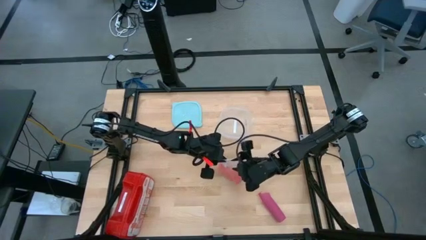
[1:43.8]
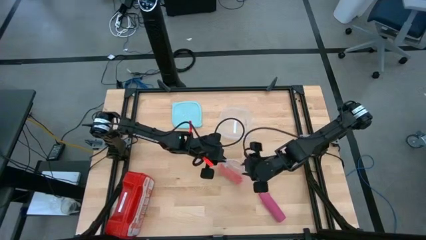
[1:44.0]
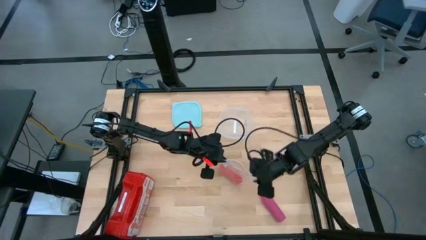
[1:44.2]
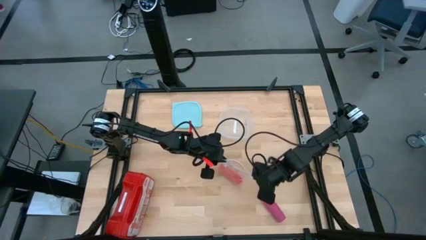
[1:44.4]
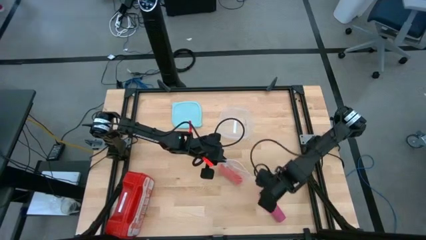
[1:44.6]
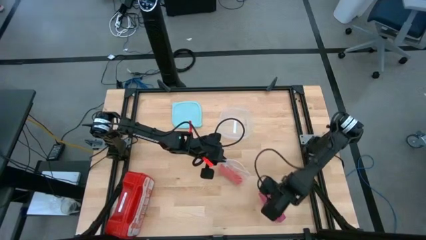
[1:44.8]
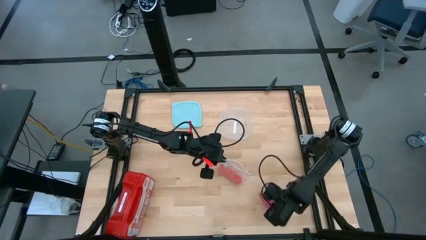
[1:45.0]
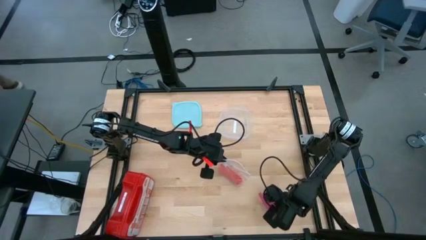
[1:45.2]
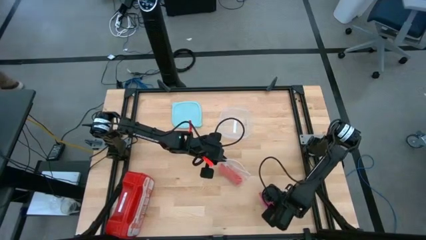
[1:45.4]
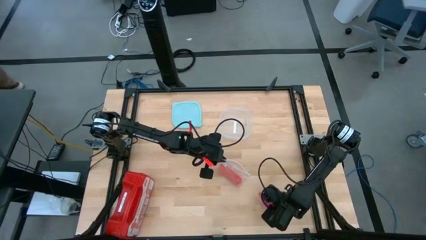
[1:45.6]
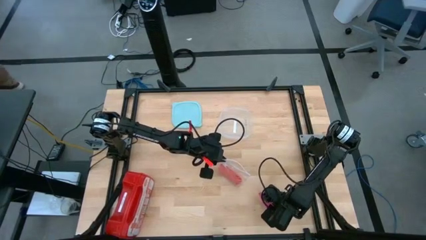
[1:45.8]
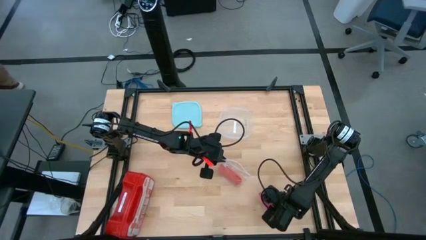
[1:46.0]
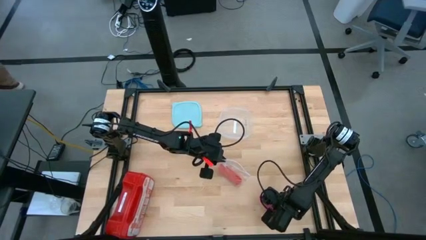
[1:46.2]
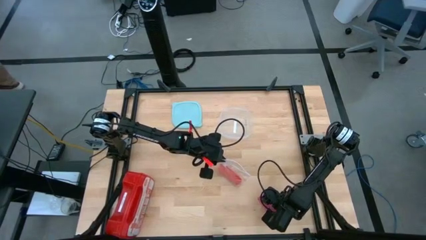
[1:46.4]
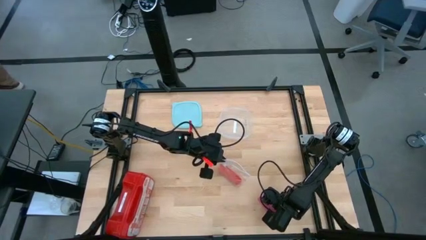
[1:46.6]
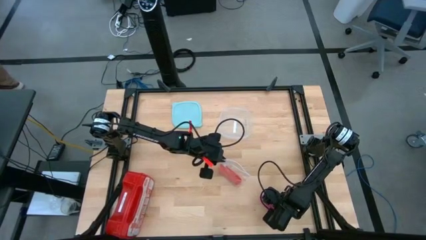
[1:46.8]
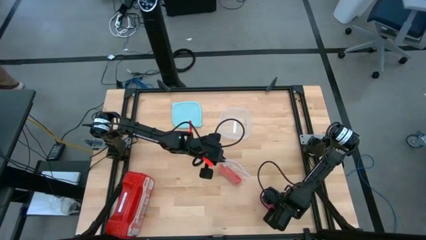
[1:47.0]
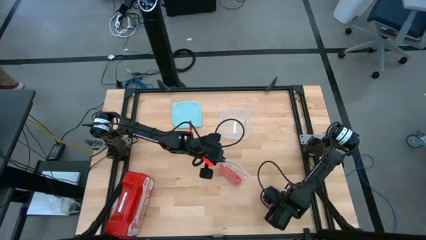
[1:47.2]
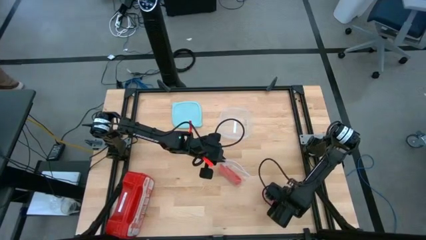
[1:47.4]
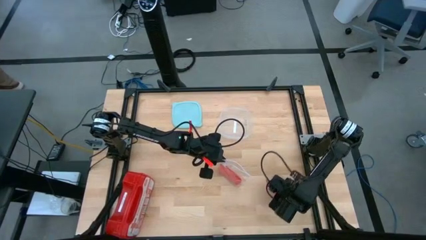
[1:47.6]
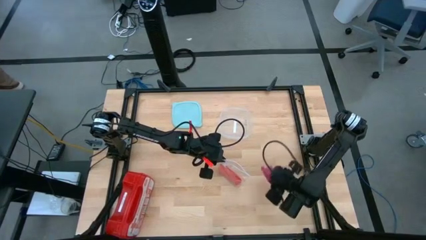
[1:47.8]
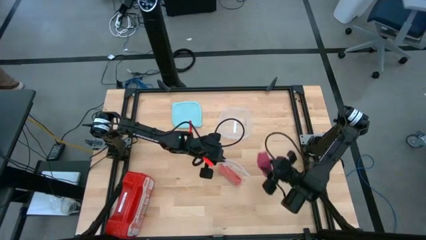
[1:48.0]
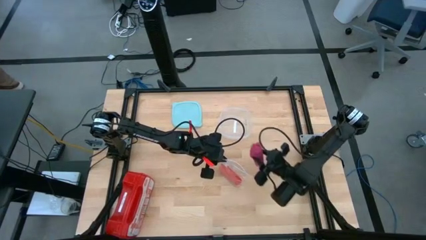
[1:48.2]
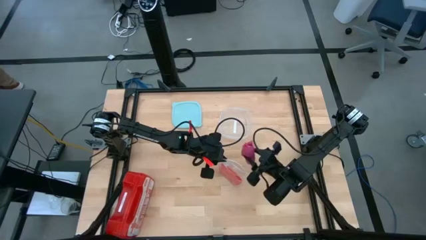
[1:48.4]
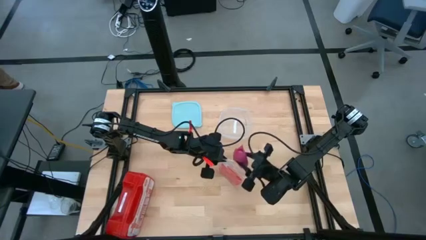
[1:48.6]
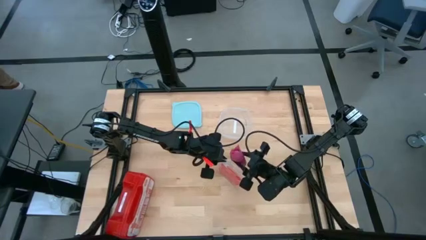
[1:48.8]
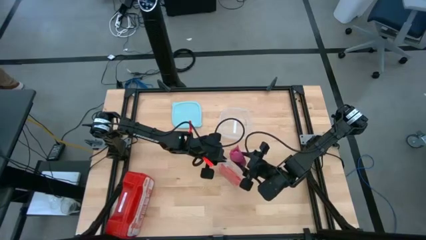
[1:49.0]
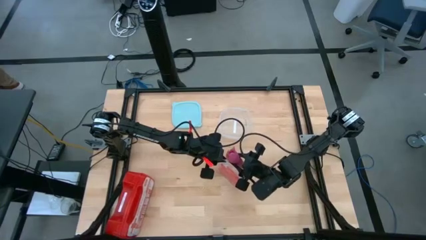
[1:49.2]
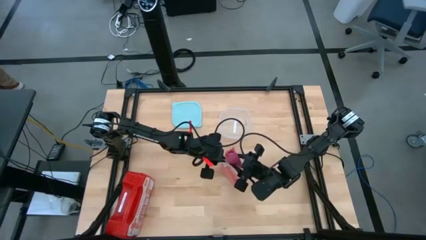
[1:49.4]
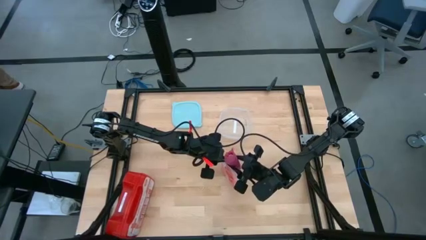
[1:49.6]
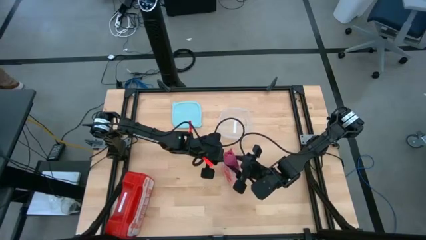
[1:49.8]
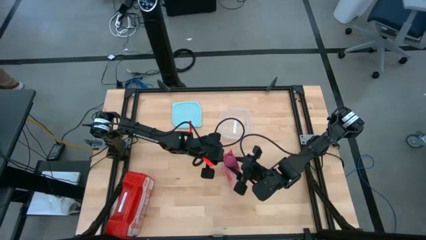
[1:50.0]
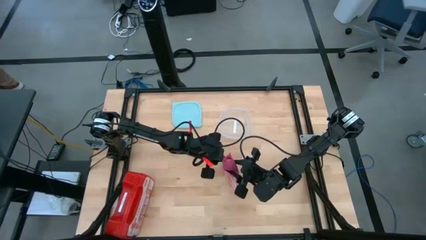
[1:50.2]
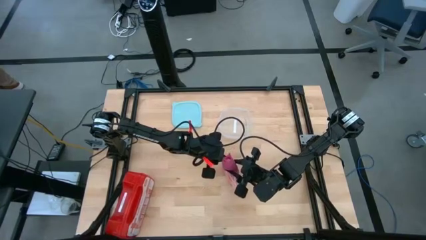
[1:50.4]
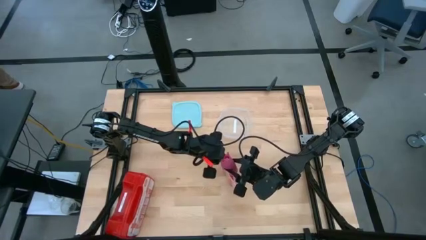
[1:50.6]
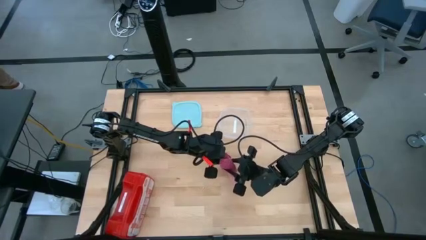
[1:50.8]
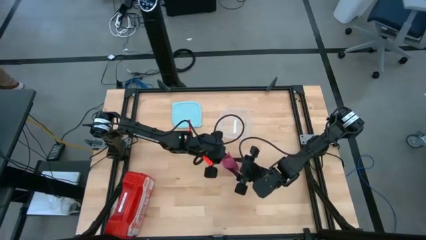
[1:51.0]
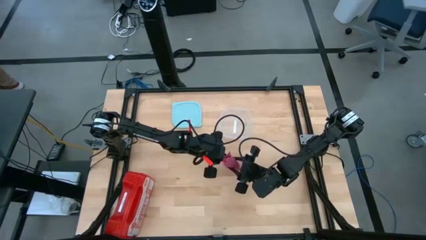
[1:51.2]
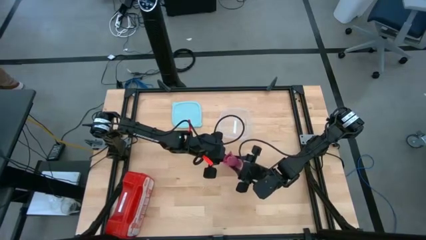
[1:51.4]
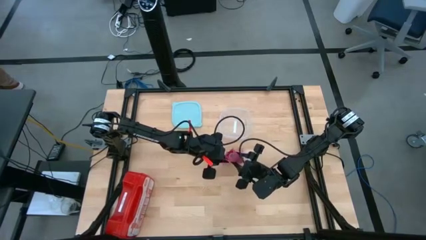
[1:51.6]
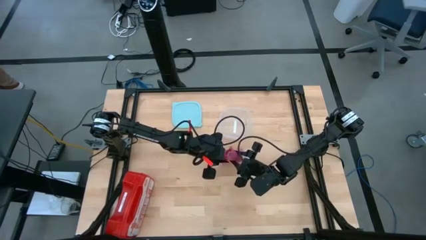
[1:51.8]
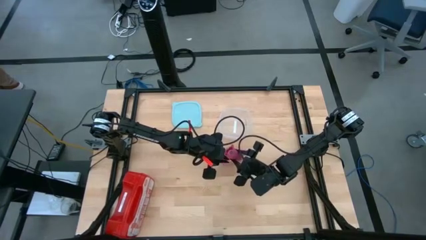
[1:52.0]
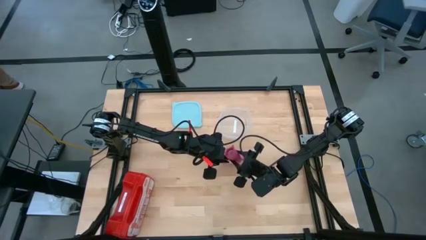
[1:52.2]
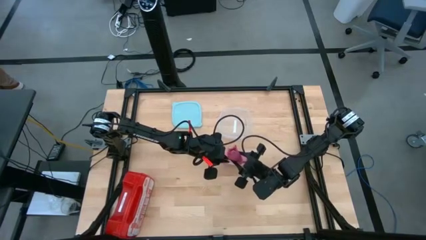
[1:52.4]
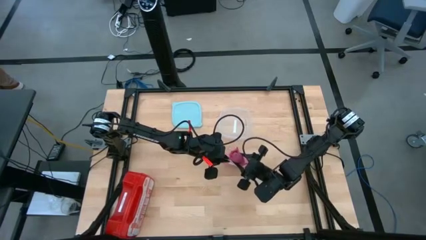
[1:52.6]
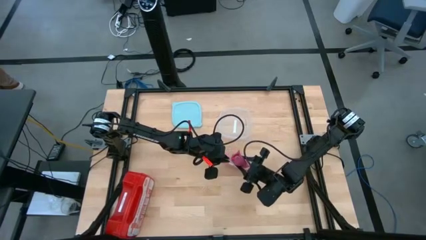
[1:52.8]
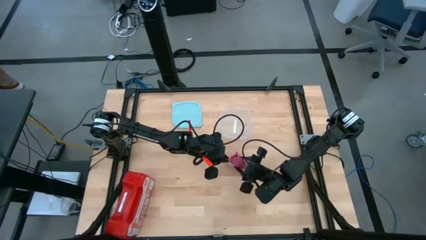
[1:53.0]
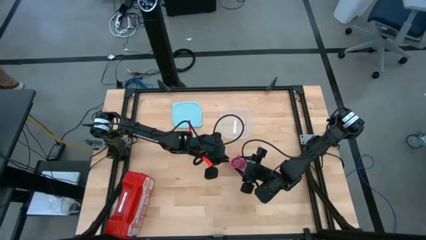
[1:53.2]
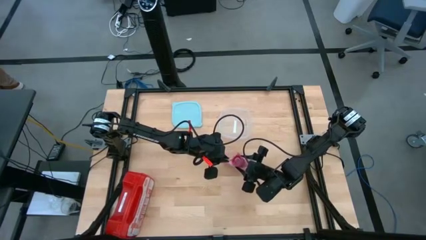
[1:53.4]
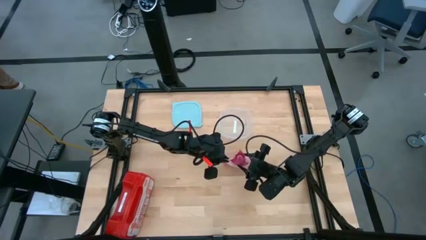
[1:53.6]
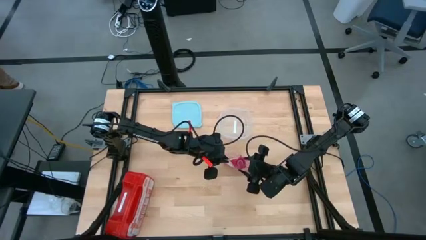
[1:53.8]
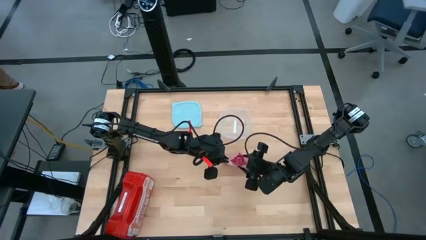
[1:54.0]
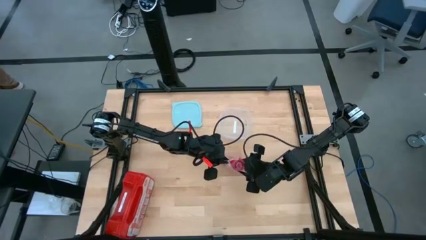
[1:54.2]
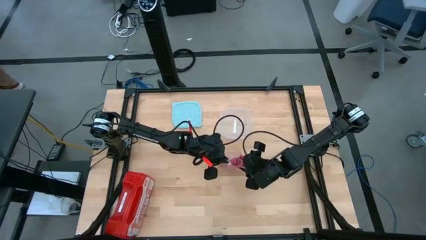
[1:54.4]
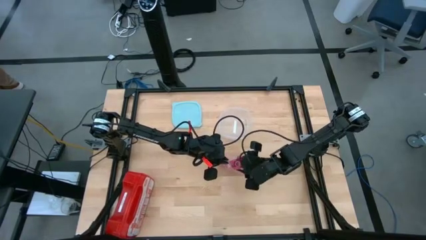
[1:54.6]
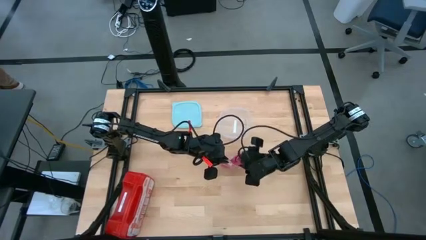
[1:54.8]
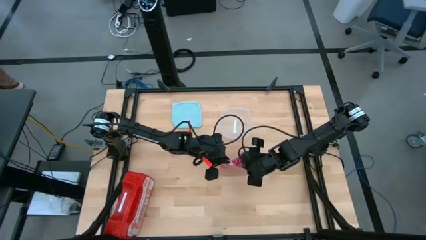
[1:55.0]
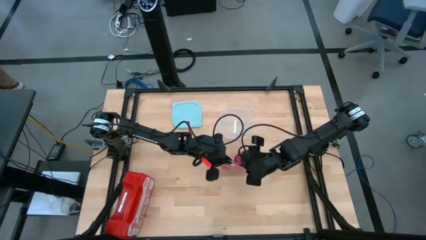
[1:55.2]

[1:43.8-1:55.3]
Task: Roll bandage
Put the rolled pink bandage into the transparent zip bag
